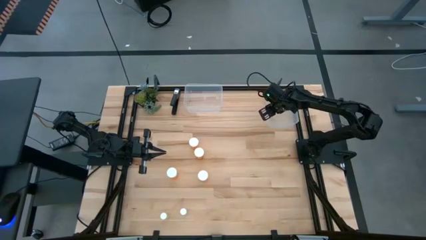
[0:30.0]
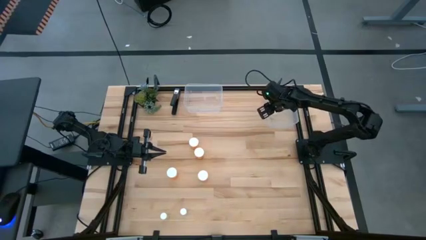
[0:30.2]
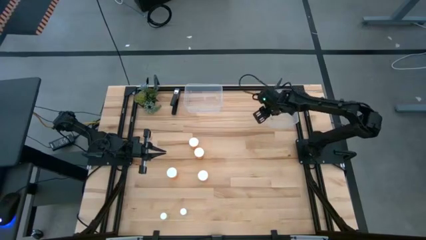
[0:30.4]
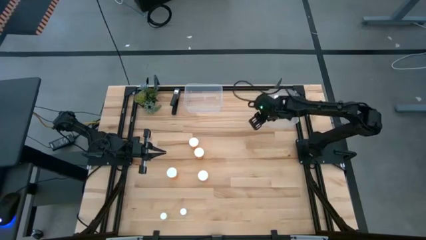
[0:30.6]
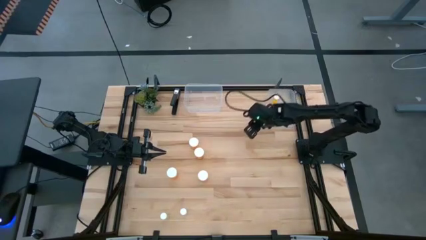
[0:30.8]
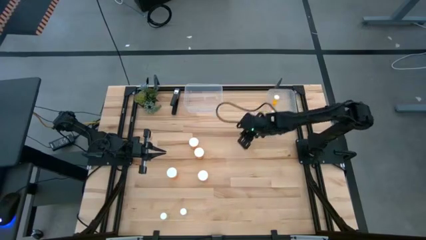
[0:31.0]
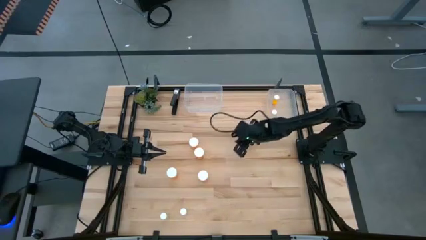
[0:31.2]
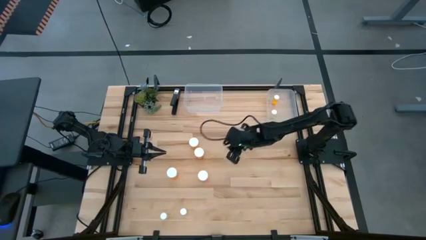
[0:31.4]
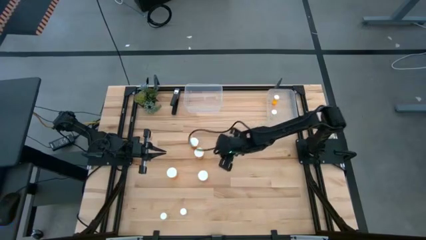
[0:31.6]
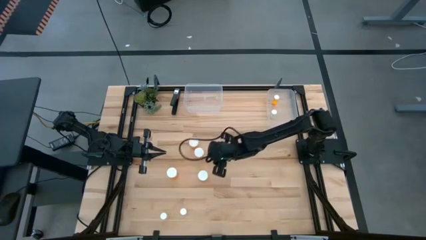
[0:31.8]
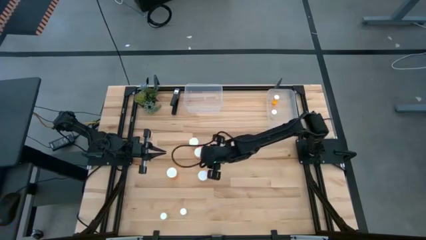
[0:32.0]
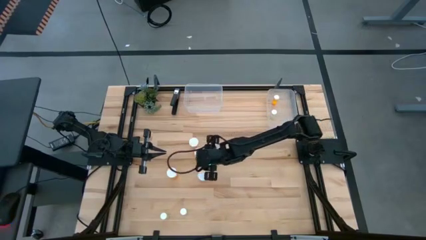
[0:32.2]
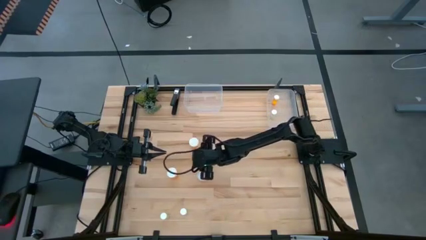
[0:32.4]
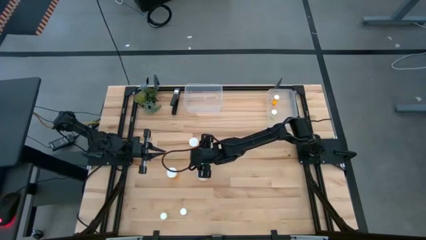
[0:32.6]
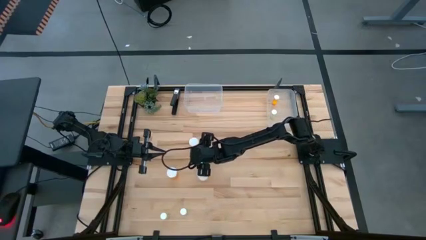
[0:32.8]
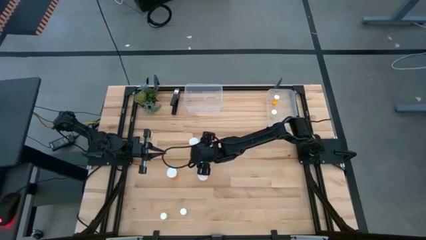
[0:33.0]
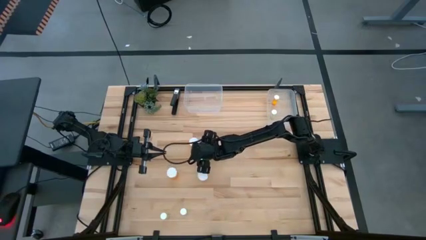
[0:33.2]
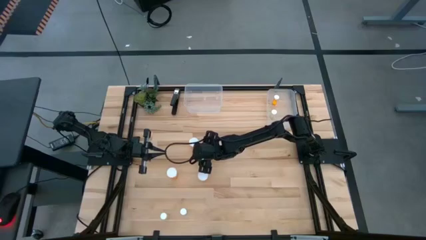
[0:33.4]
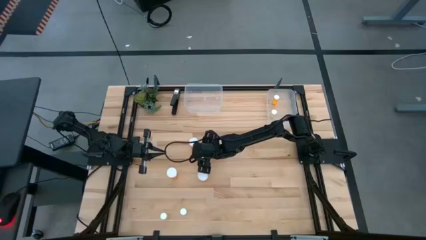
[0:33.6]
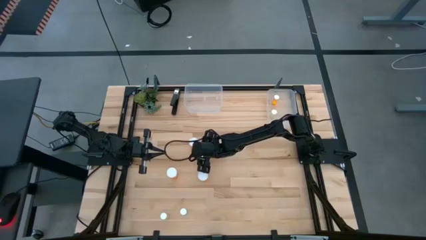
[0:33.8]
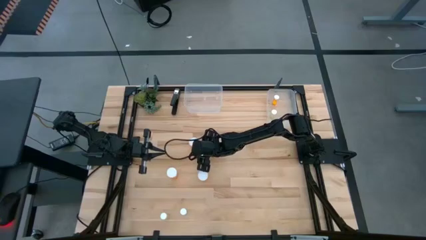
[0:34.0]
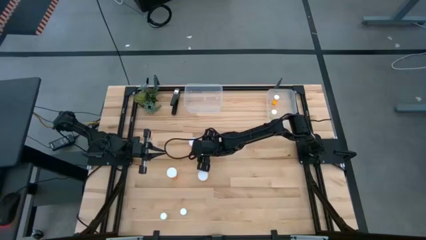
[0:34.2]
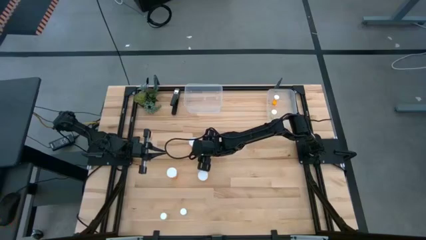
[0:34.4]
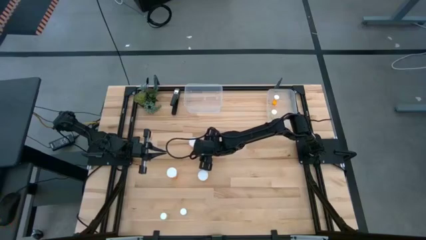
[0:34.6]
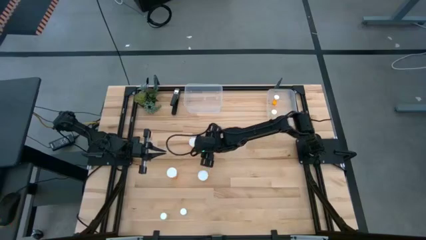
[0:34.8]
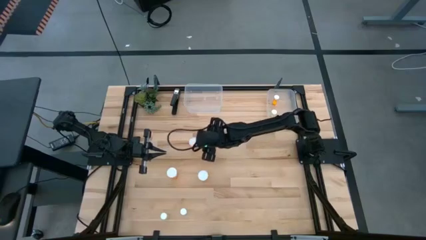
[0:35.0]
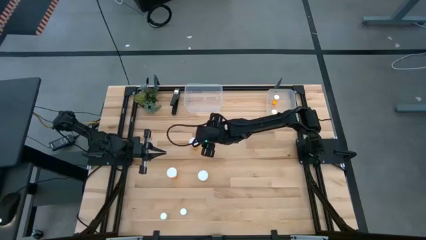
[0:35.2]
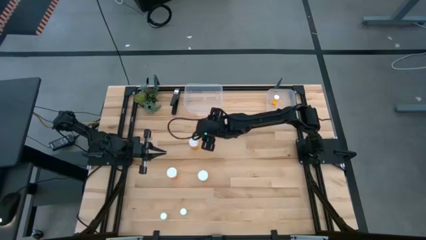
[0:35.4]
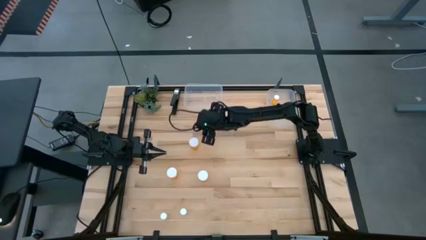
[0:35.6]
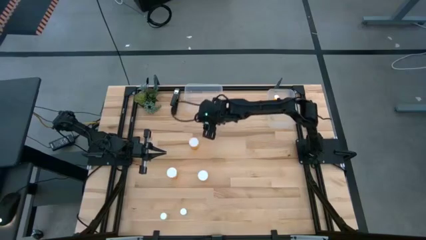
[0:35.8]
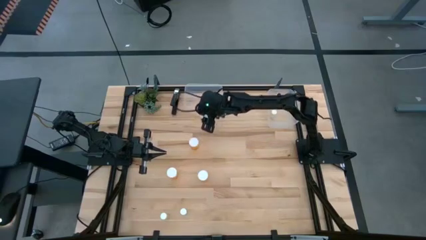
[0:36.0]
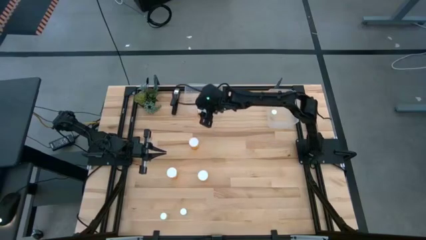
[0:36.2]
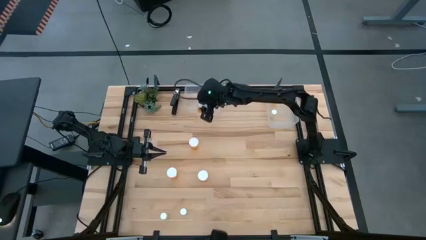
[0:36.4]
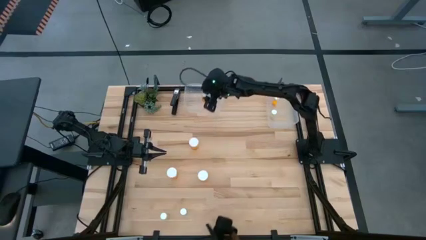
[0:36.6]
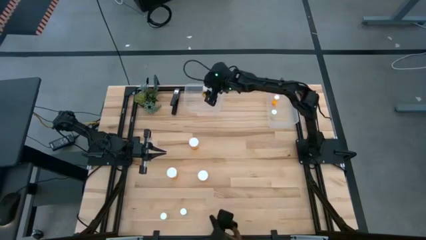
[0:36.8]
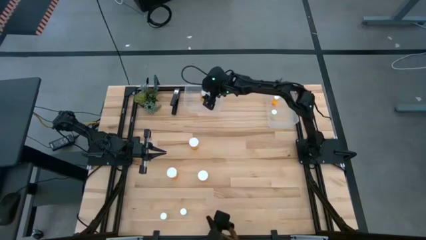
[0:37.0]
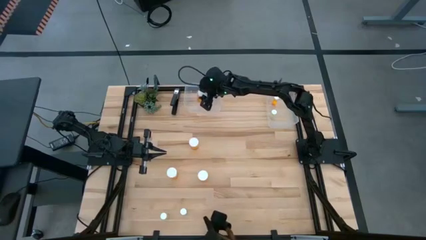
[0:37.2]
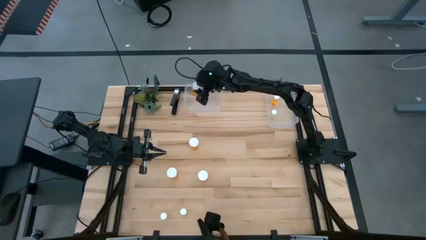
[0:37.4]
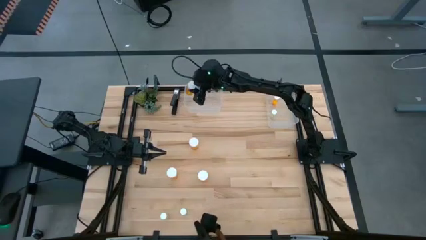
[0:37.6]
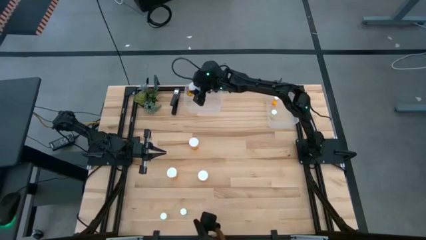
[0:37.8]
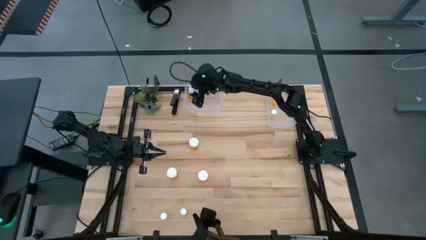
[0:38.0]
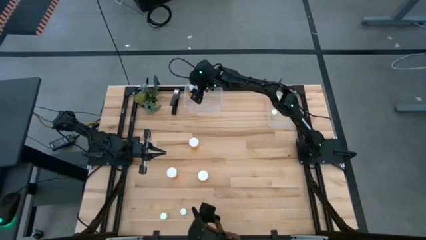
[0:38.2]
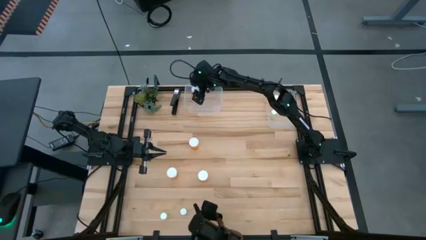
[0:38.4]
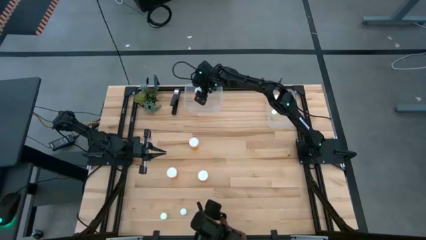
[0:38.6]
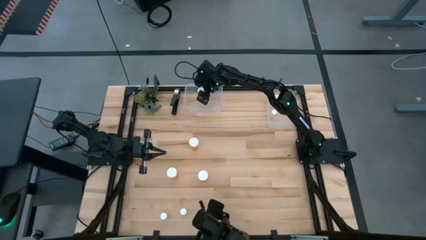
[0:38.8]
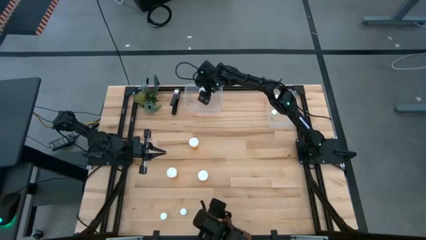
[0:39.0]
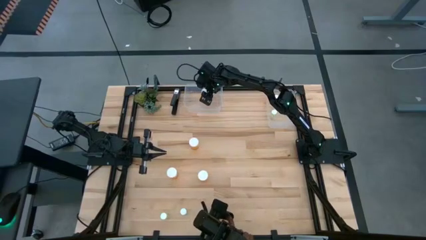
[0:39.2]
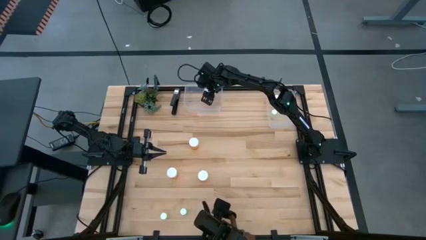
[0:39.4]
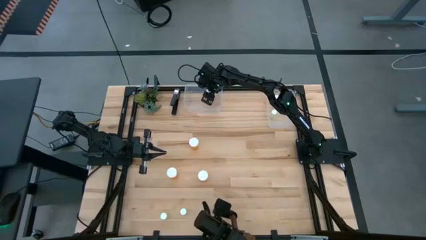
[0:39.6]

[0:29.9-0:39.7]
Task: Pick and place medicine bottles into bin by pill shape (circle, oval)
Put the middle big orange pill bottle into the left transparent bin

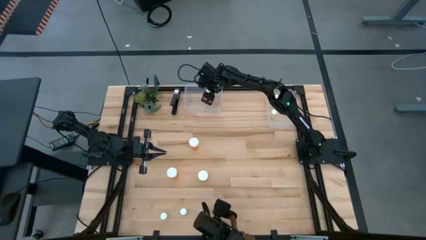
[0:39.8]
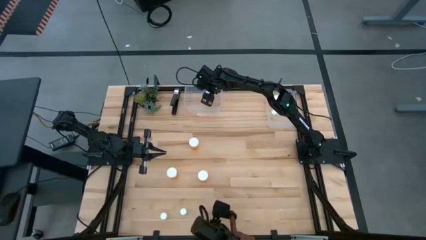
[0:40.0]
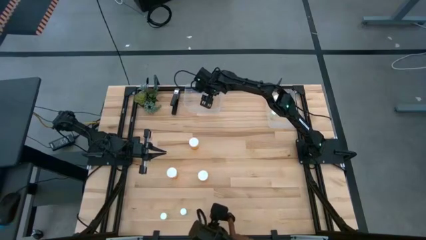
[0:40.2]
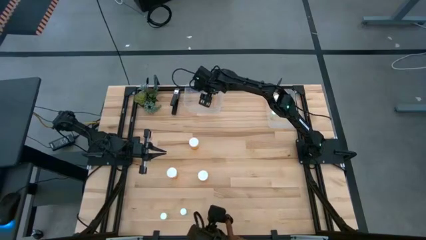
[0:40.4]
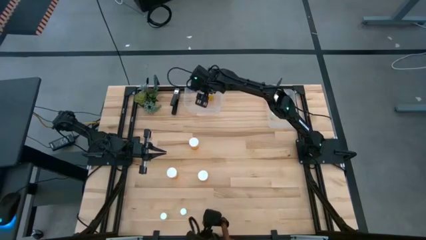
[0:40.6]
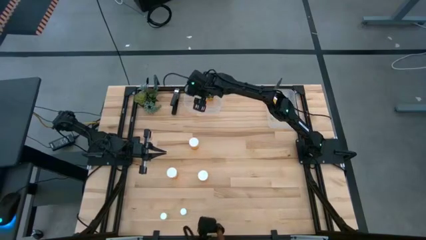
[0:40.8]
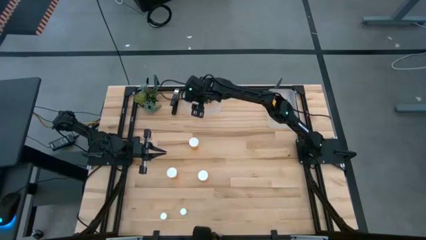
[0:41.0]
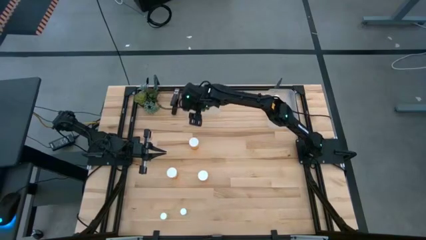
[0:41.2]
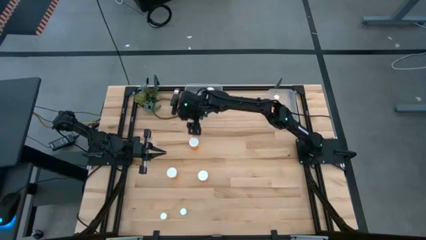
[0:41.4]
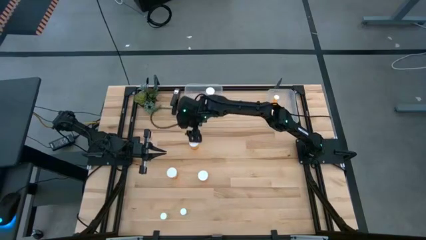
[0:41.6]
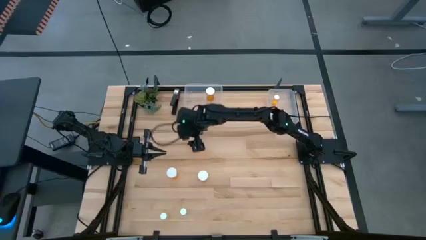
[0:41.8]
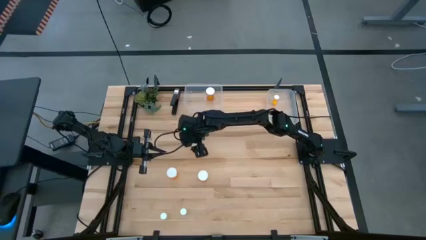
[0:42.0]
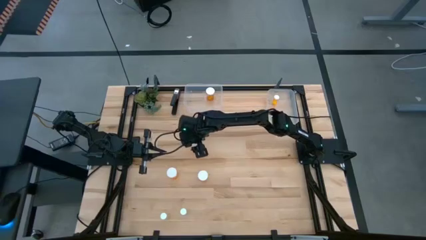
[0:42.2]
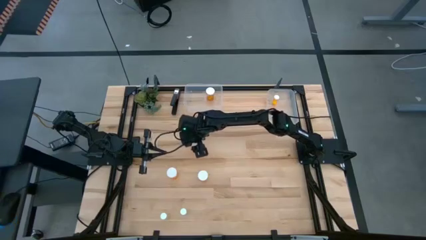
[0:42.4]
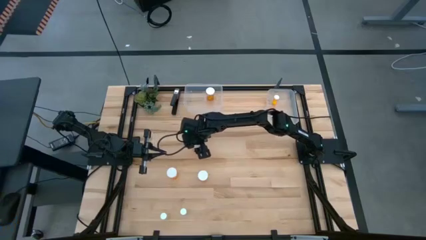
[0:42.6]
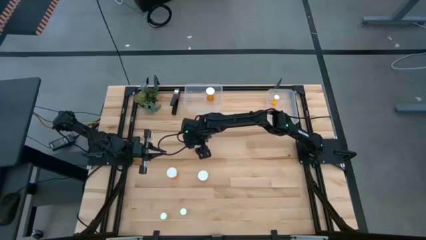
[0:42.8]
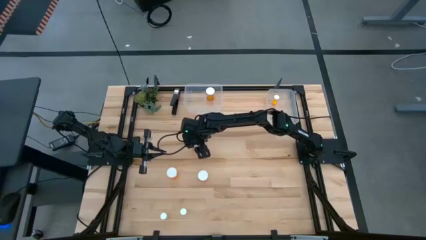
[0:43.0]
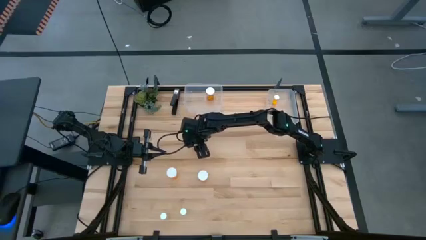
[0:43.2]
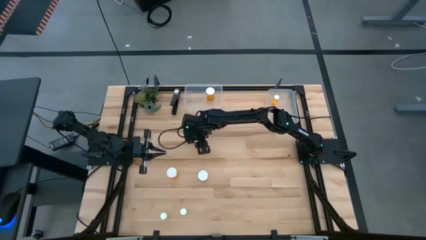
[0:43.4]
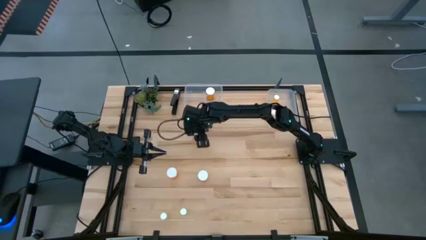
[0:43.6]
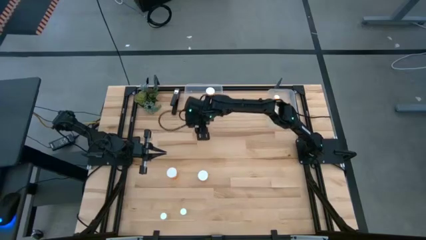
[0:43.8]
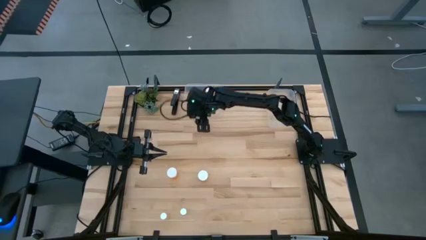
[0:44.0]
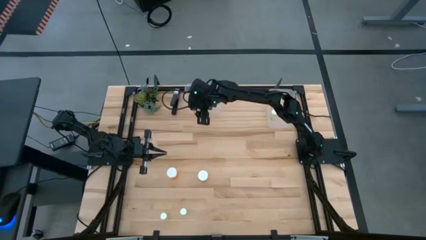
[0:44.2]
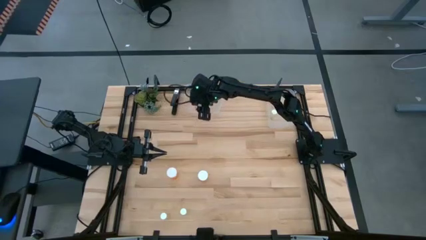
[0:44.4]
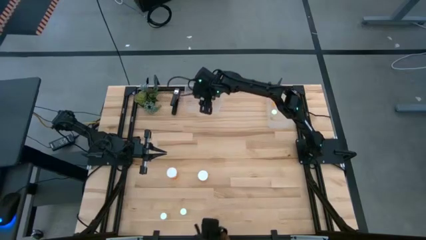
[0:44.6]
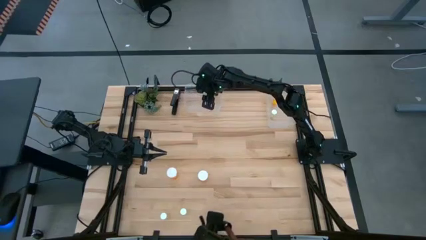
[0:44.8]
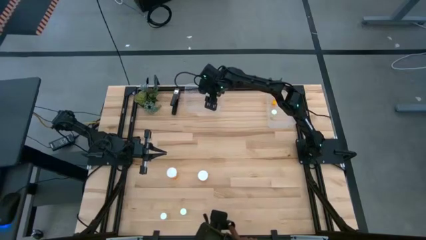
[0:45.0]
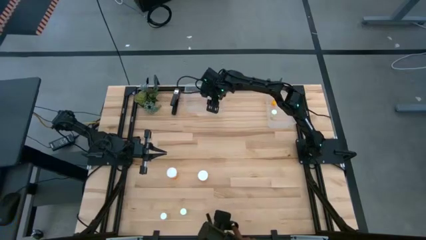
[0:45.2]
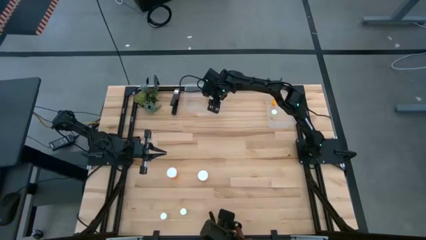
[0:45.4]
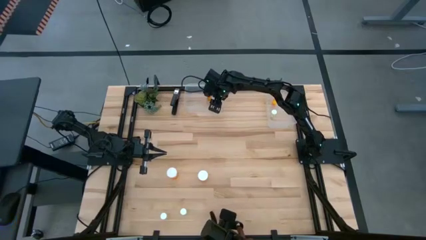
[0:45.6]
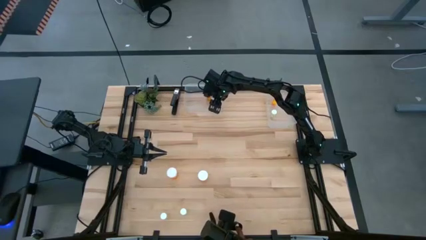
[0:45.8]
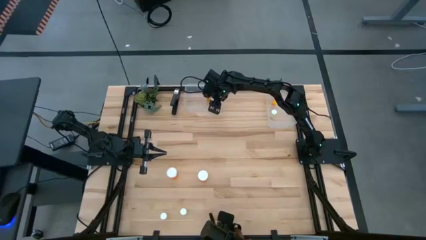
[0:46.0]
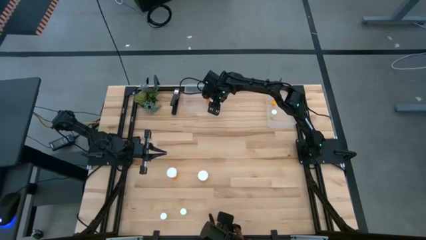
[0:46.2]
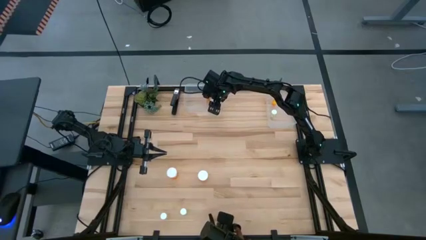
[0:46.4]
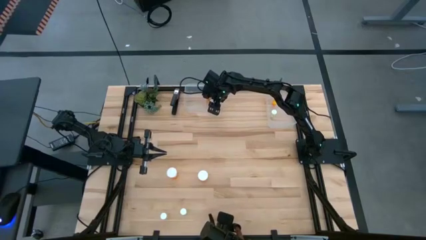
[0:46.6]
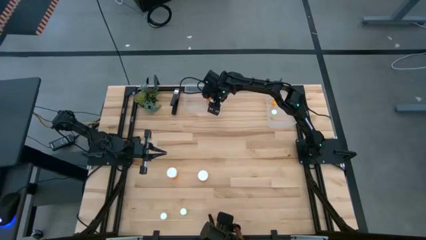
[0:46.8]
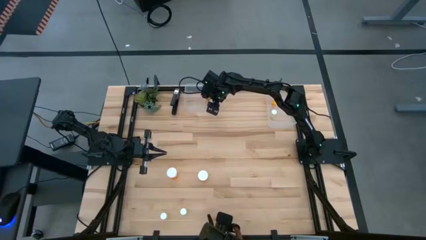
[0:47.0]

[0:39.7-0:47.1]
Put the top big orange pill bottle into the left transparent bin
